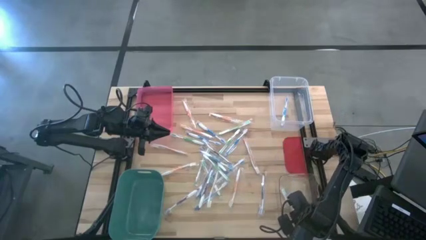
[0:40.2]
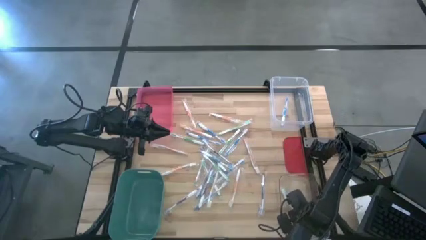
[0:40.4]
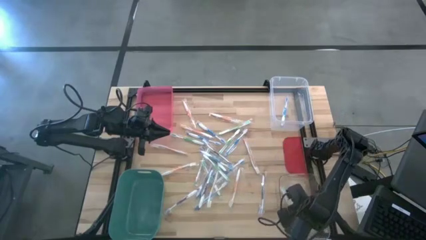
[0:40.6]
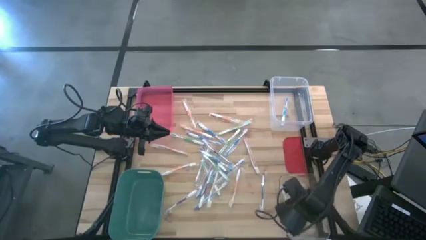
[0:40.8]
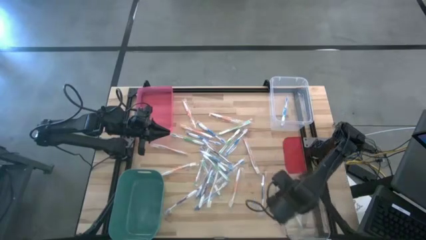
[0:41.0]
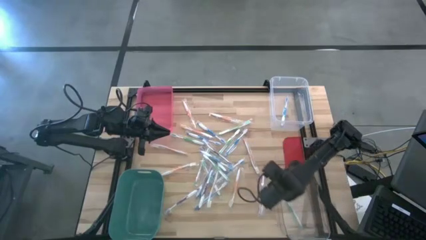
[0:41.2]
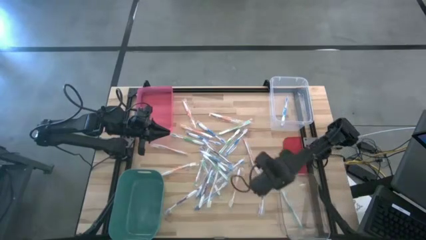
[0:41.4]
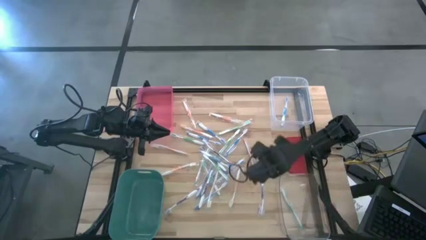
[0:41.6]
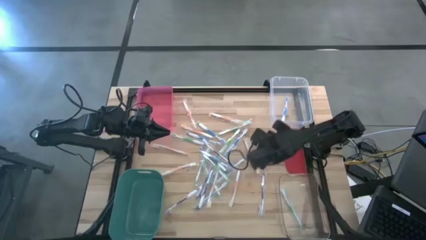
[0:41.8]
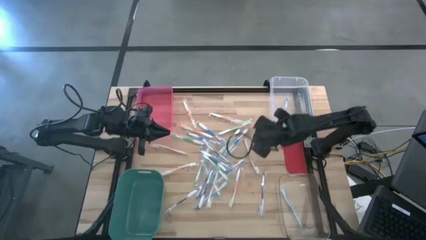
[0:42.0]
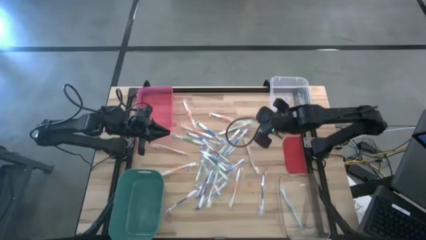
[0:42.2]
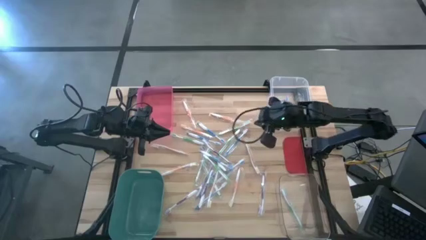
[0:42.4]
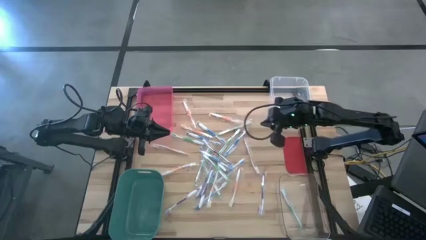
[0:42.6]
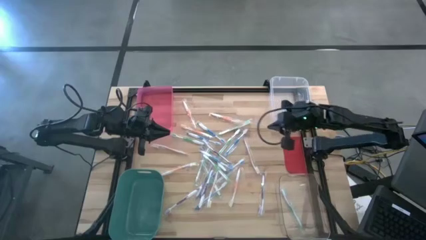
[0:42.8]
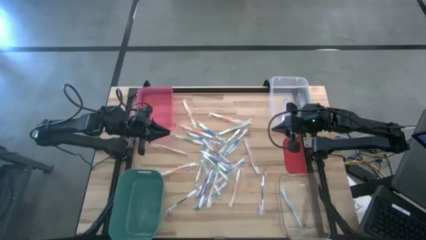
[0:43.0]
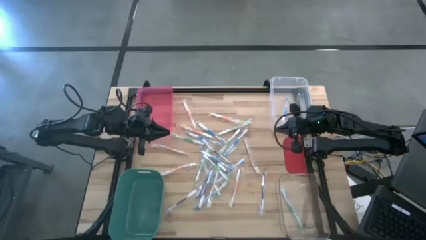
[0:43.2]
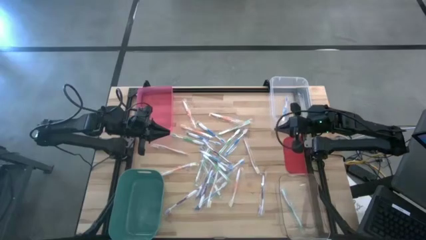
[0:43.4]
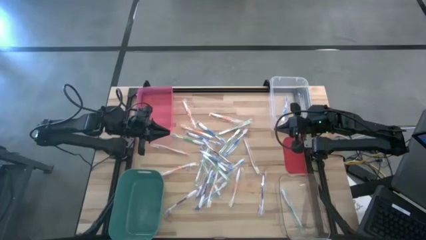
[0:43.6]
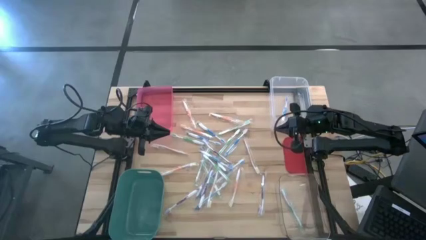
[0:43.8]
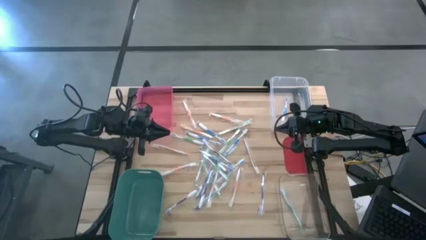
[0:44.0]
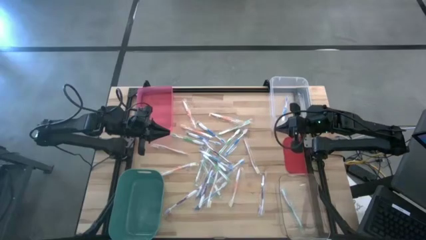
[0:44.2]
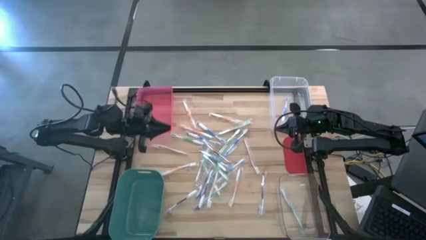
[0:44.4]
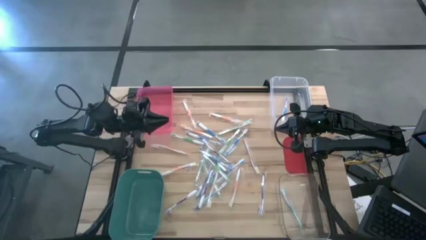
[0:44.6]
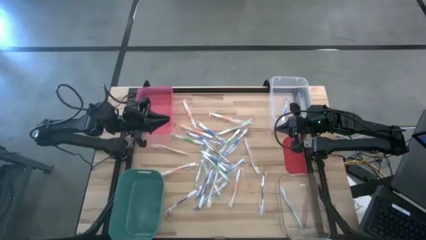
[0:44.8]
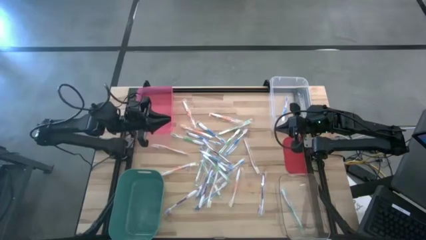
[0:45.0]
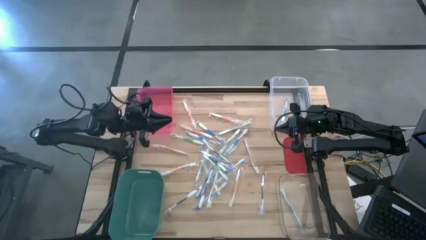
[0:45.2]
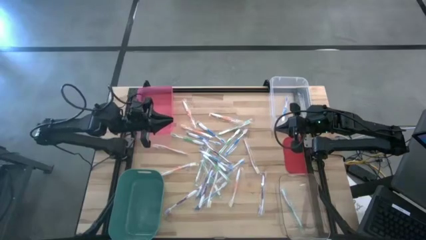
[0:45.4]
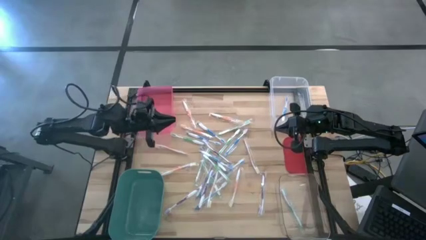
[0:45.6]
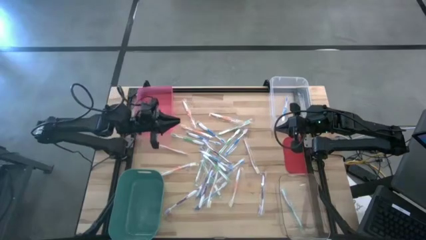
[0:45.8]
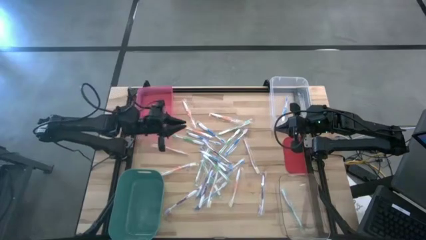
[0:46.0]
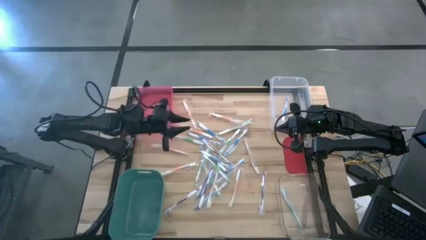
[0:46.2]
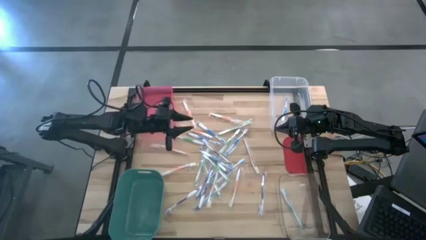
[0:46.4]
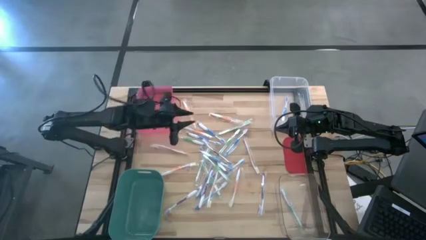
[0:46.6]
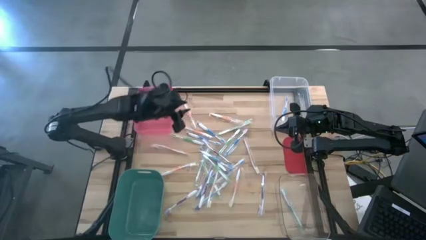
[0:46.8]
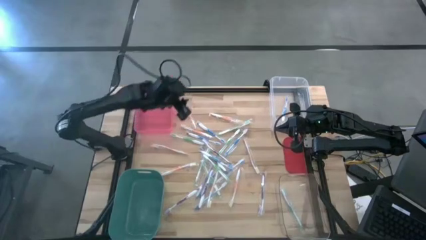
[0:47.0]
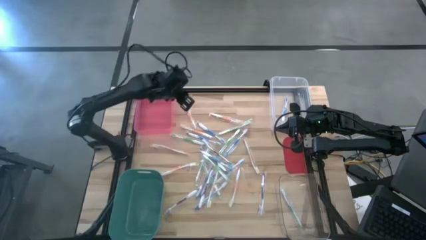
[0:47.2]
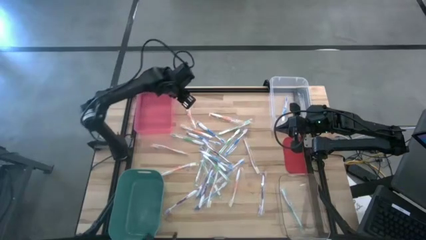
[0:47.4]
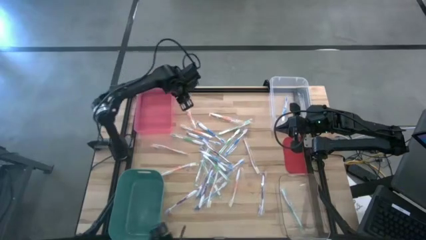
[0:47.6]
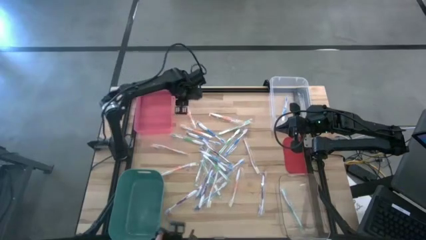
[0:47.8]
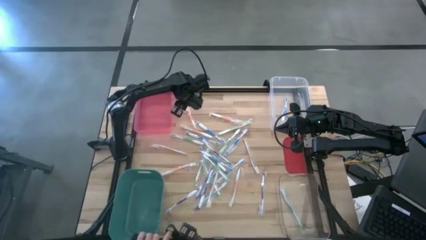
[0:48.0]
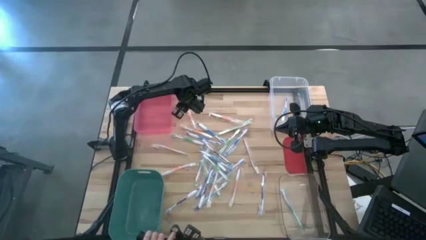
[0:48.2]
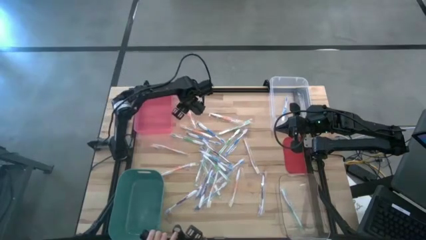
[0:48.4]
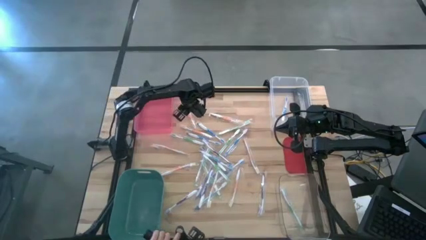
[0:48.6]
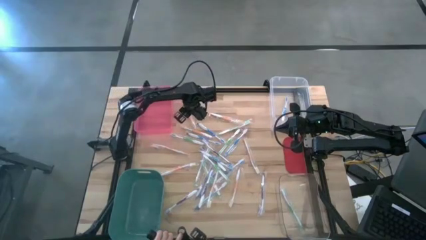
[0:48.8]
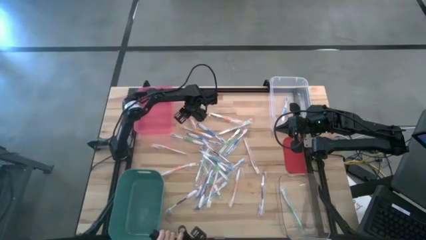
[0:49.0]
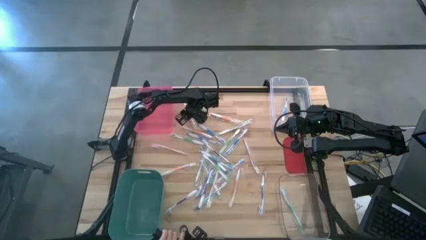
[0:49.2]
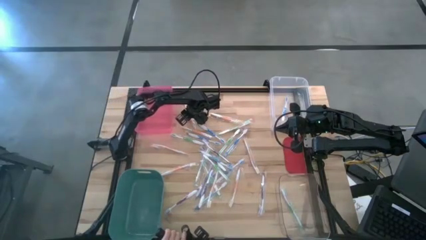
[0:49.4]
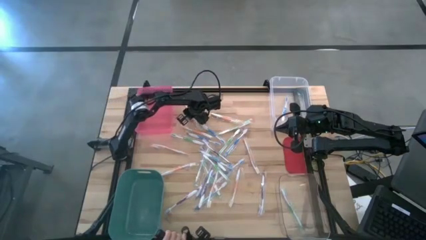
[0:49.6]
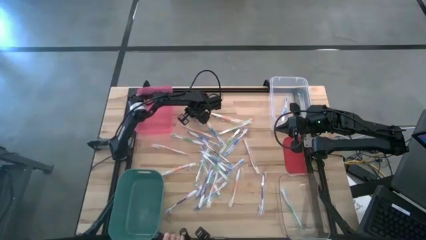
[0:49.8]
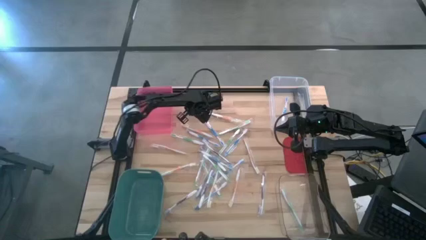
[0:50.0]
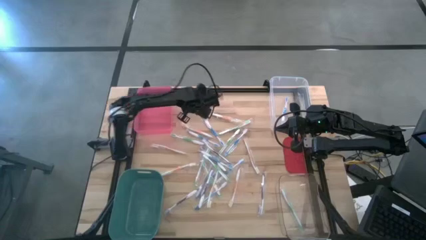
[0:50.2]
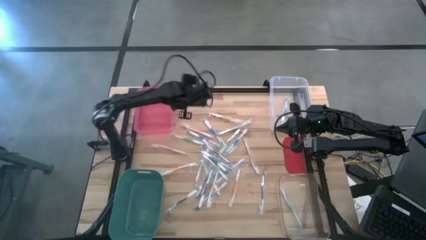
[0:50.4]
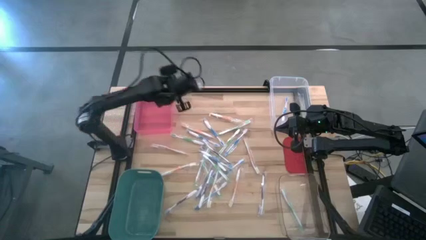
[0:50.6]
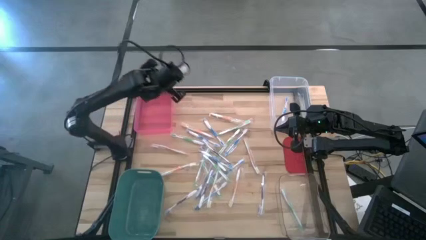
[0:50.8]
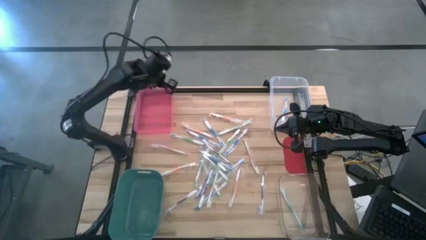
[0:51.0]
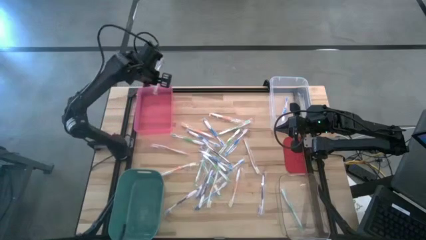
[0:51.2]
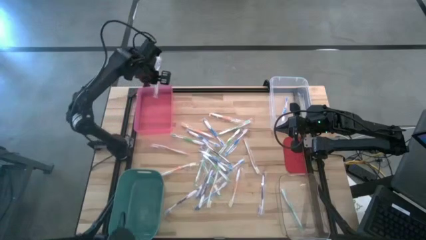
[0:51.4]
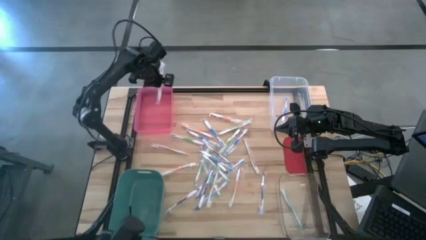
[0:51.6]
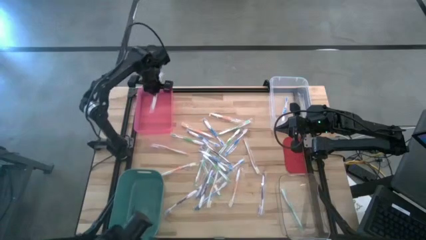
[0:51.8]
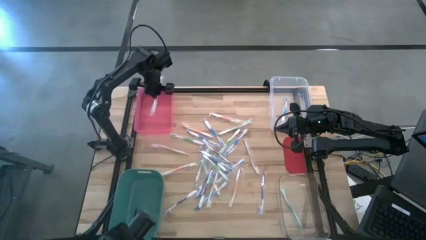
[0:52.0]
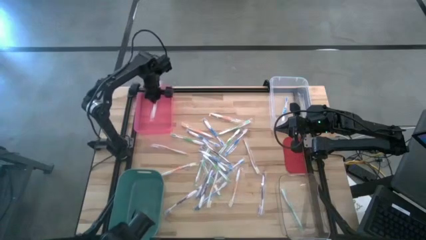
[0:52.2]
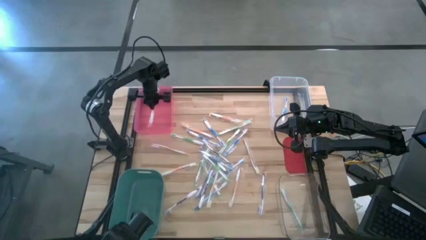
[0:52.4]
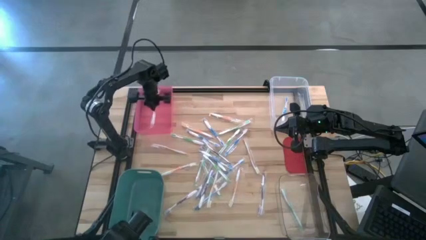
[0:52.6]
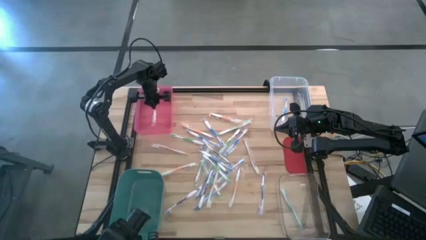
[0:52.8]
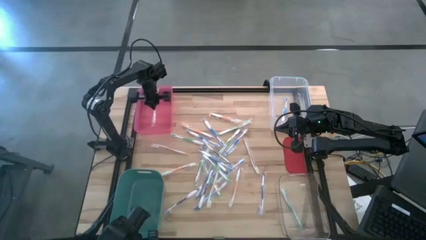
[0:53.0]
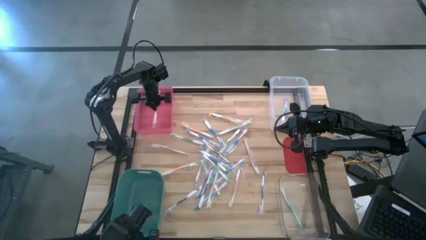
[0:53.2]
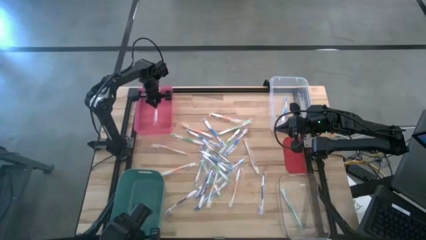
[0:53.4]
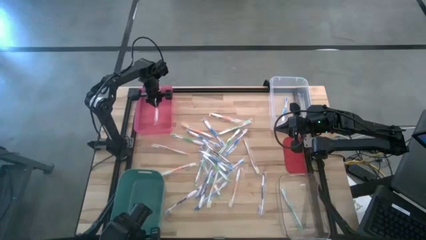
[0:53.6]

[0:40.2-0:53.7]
Task: Pick & Place Toothbrushes
Put the orange toothbrush into the pink bin
